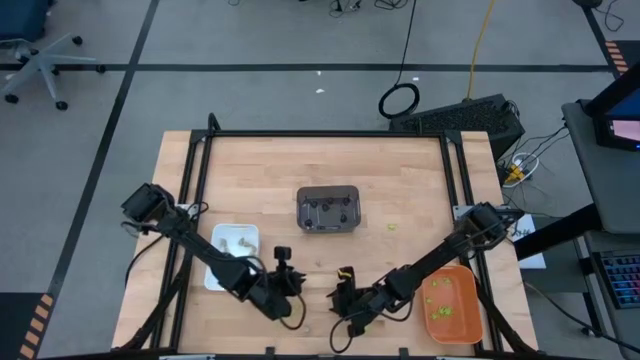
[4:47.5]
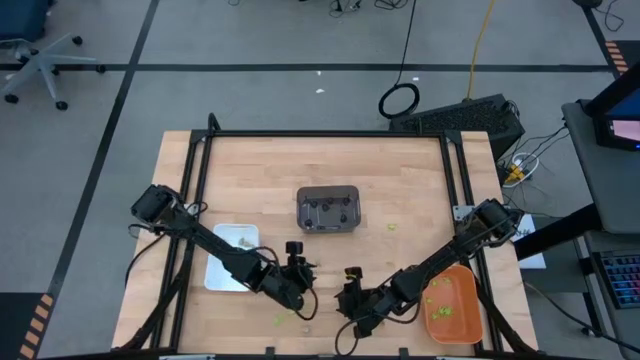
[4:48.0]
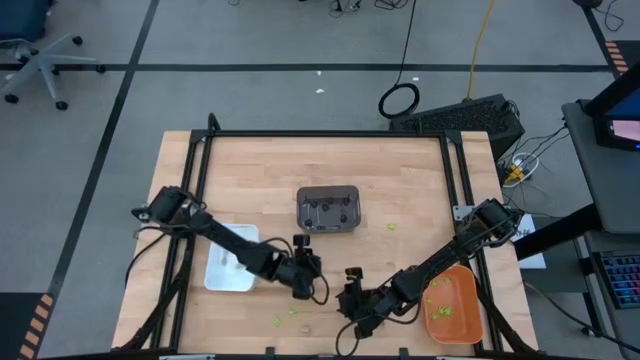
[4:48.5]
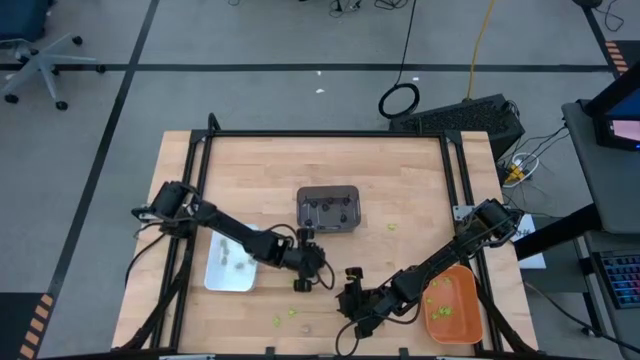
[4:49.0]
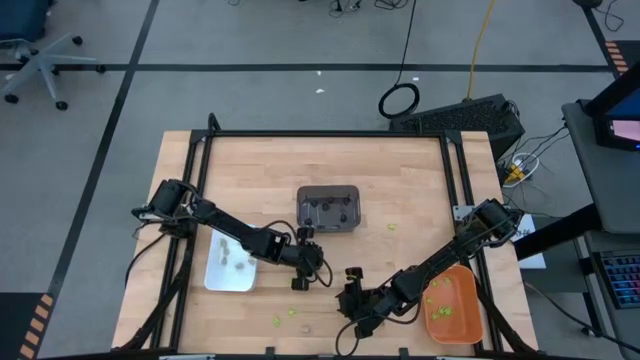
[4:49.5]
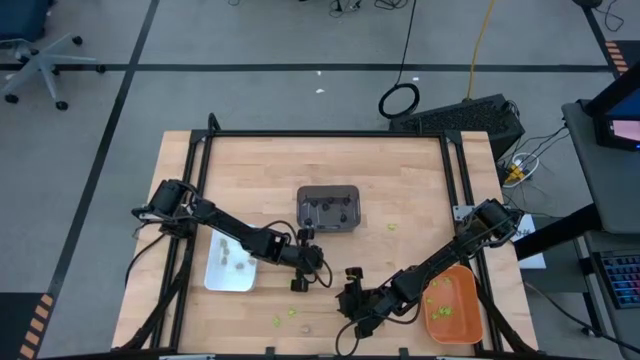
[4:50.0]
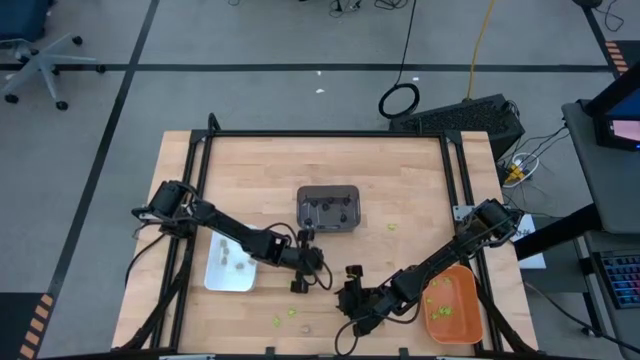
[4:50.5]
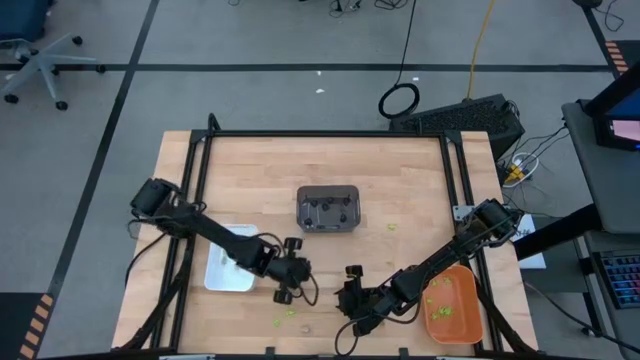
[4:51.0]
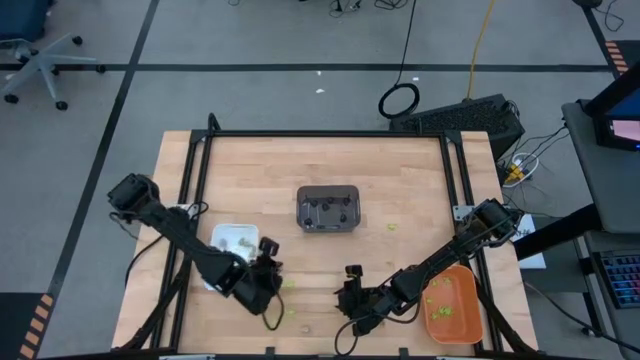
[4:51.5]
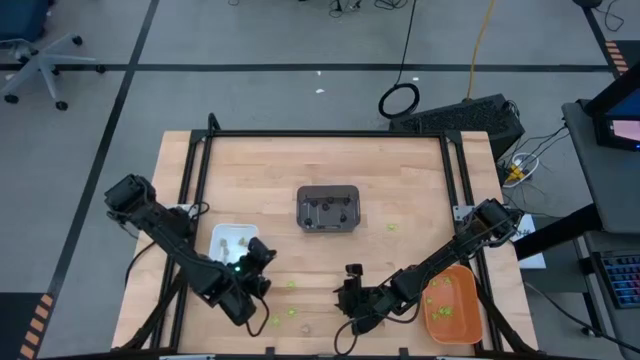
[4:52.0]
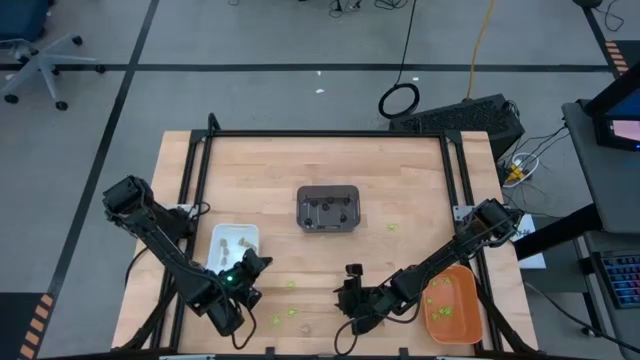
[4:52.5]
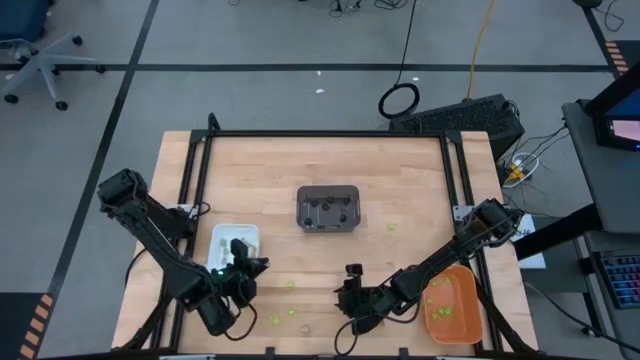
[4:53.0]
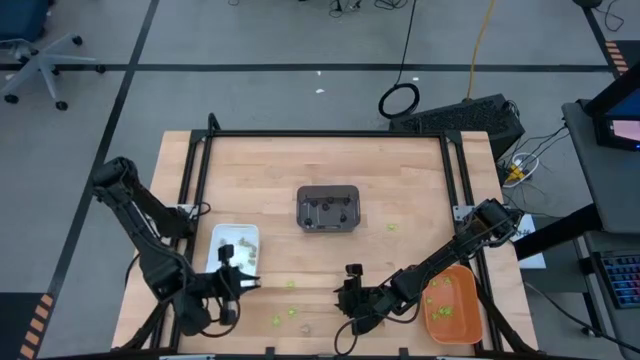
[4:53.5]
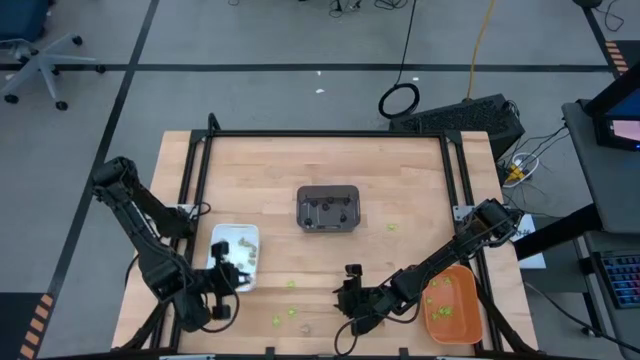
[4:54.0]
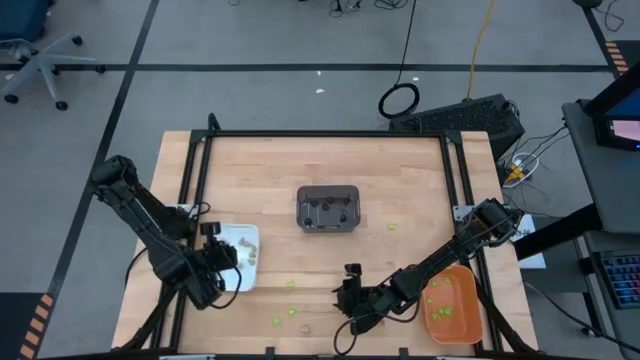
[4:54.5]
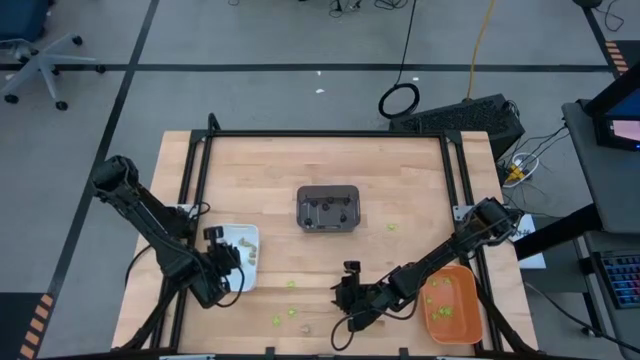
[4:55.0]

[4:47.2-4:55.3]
Task: Sort Halloween decoration
Put the white skull toy into the white bin

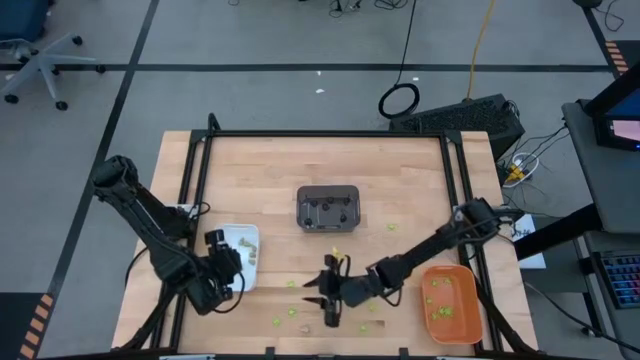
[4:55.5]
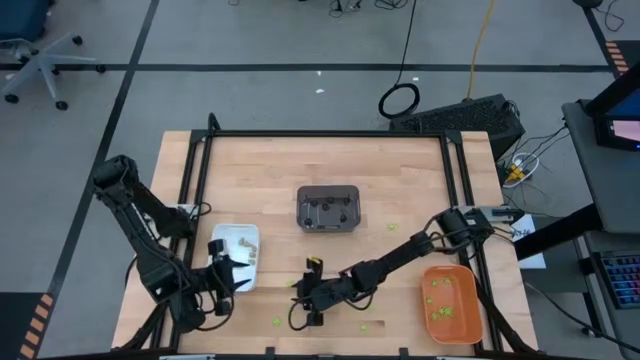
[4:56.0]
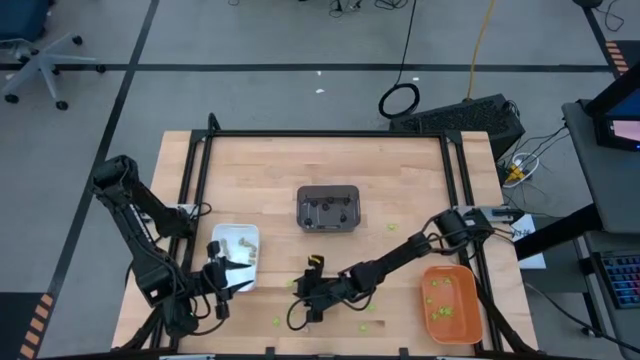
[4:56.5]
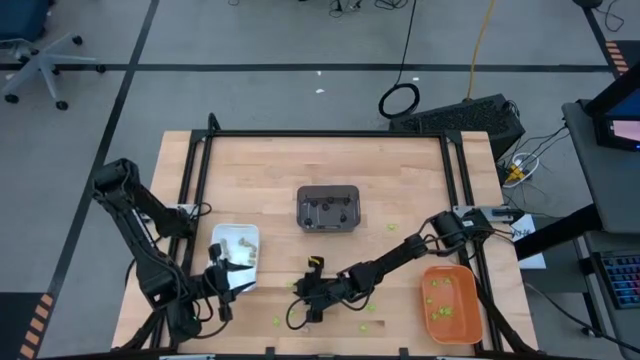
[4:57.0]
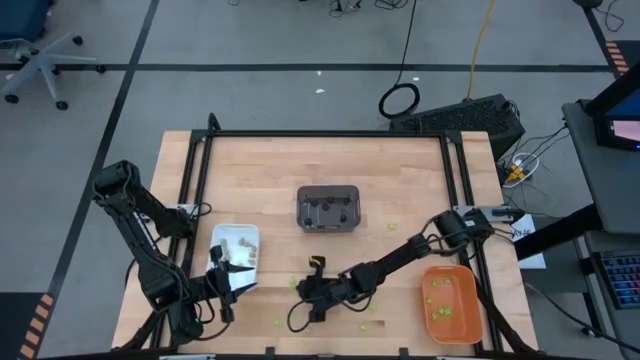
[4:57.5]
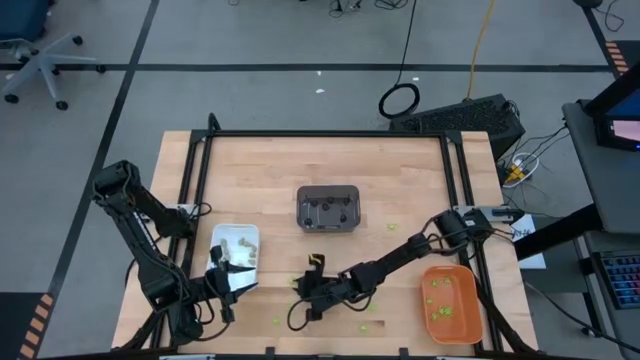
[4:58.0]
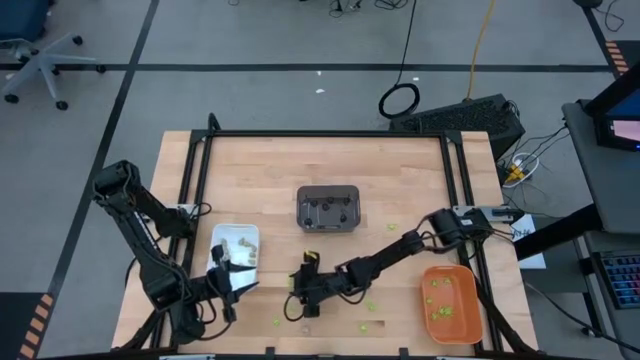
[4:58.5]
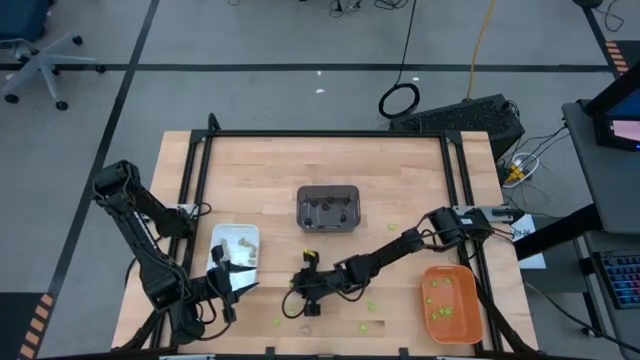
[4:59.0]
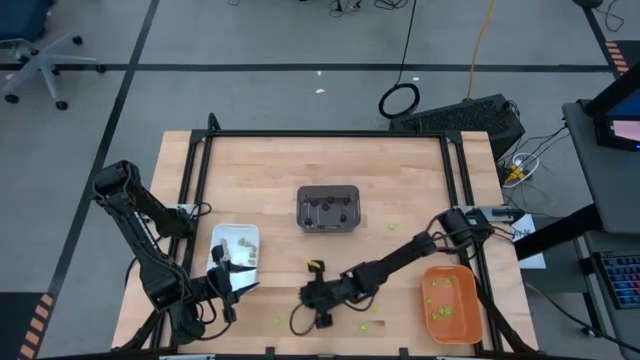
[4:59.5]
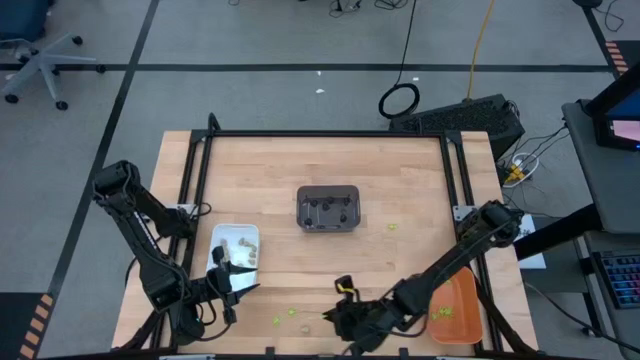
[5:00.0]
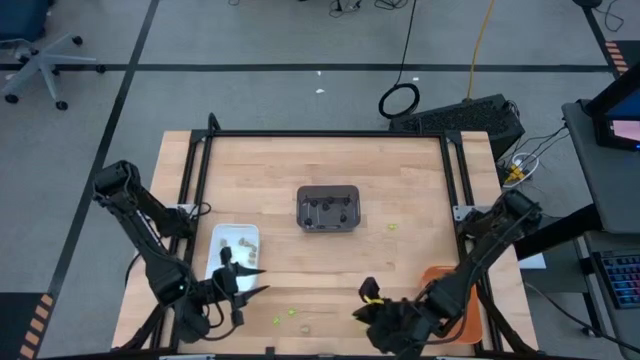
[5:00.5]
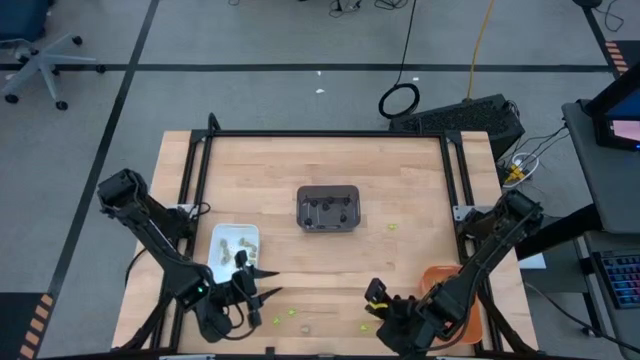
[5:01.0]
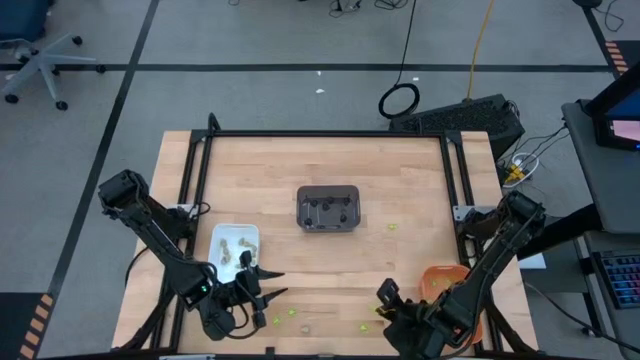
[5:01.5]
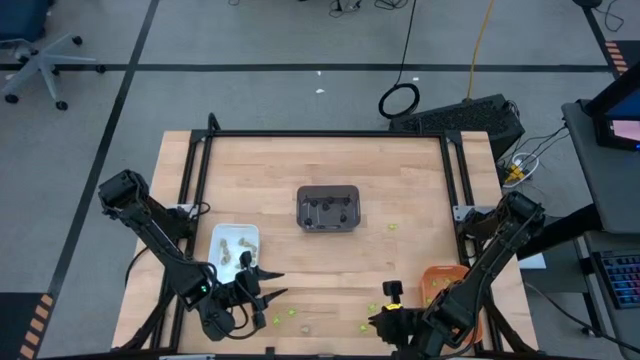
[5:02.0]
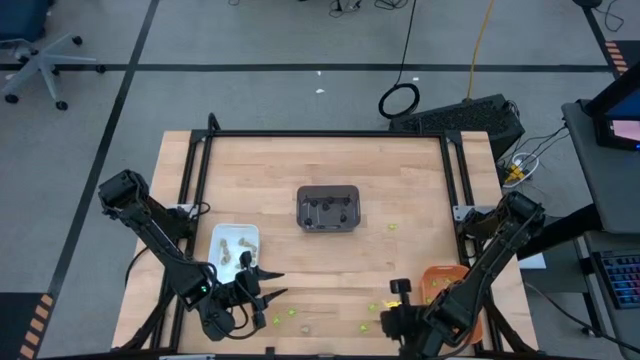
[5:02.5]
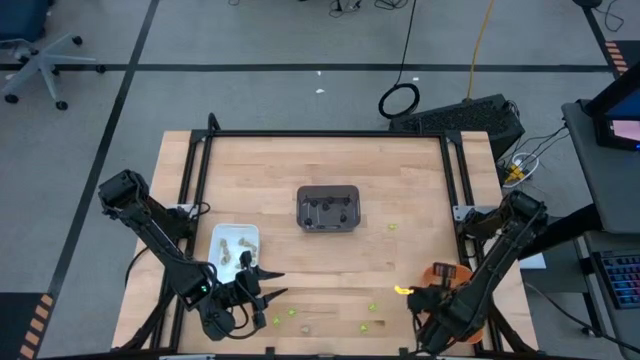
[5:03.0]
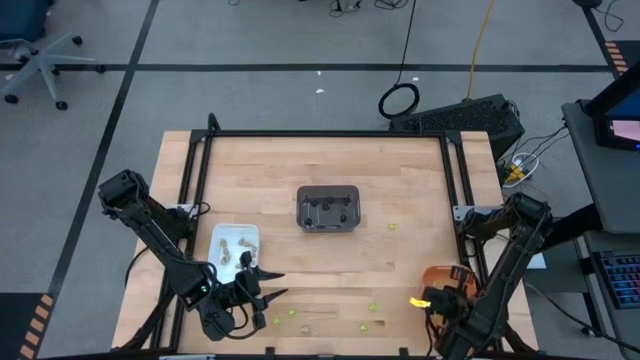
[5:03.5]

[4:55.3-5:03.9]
Put the green spider toy into the orange bin

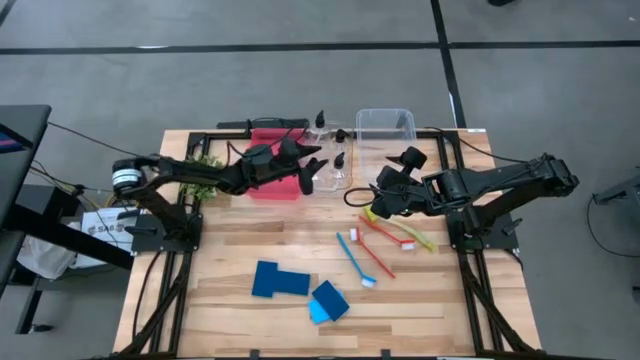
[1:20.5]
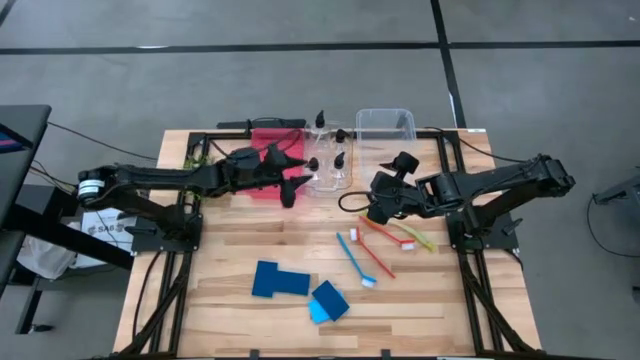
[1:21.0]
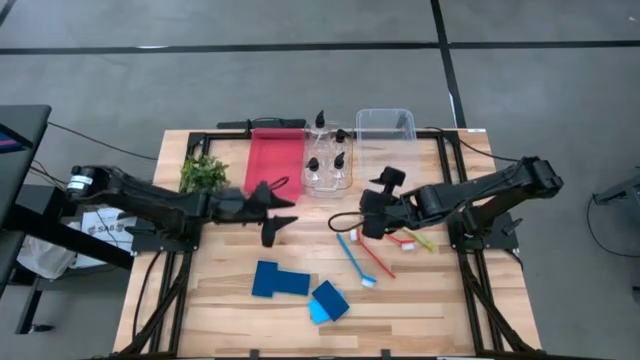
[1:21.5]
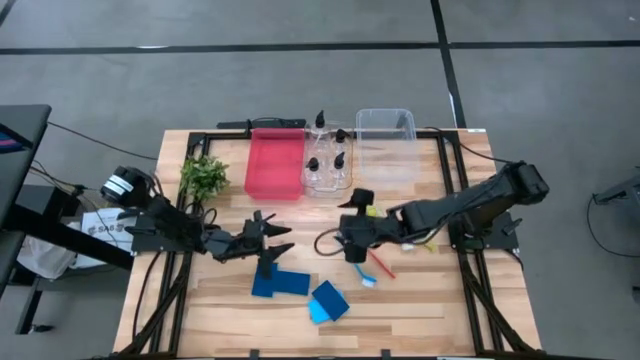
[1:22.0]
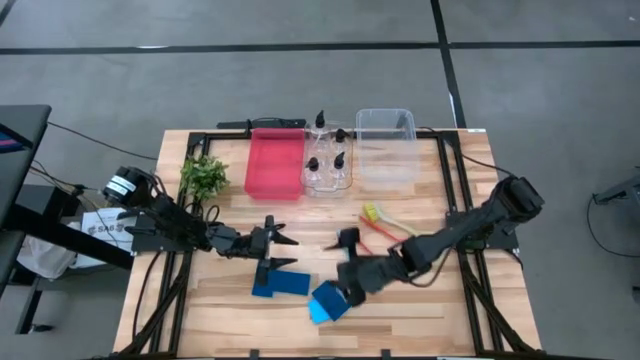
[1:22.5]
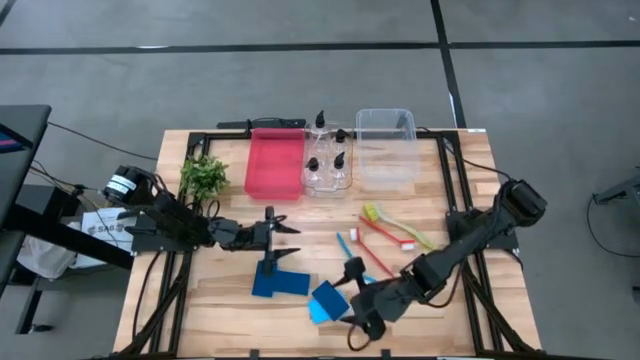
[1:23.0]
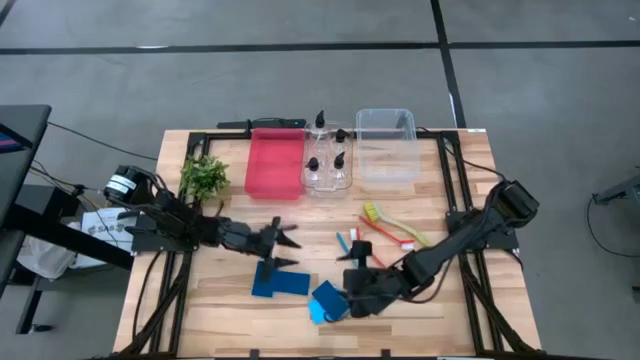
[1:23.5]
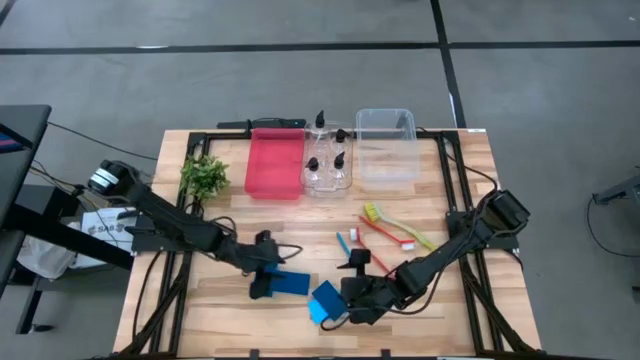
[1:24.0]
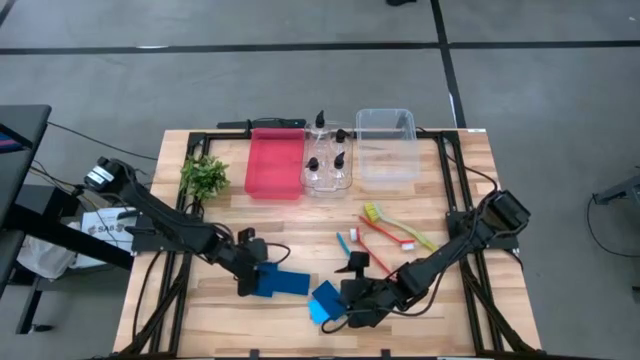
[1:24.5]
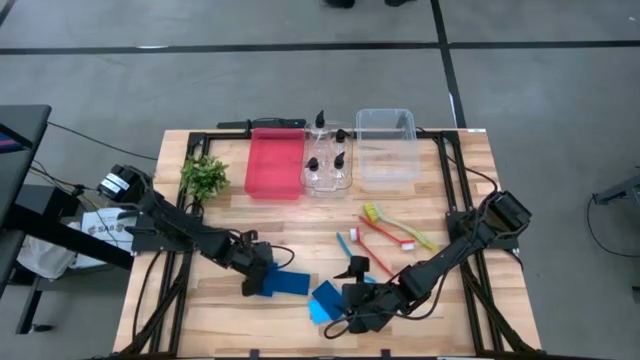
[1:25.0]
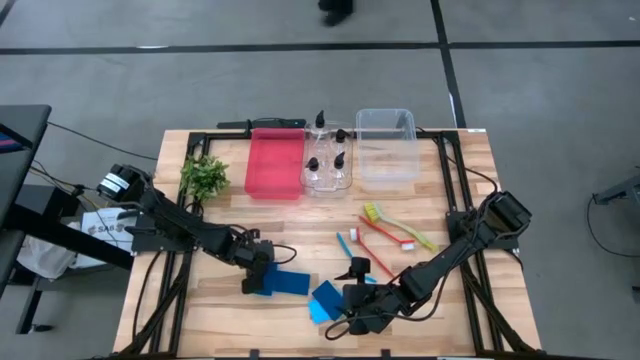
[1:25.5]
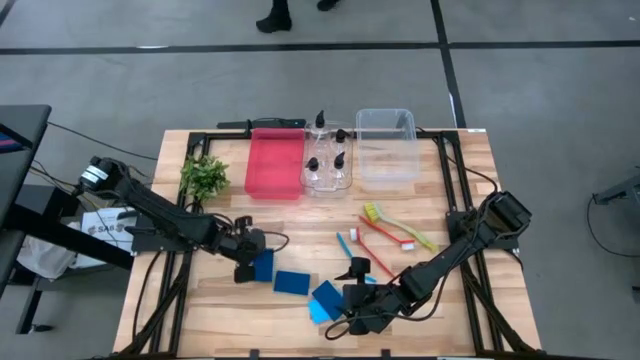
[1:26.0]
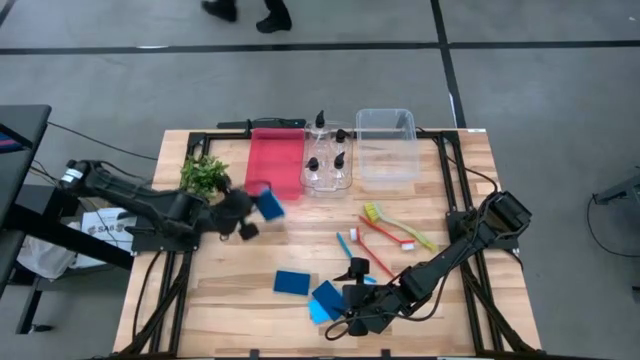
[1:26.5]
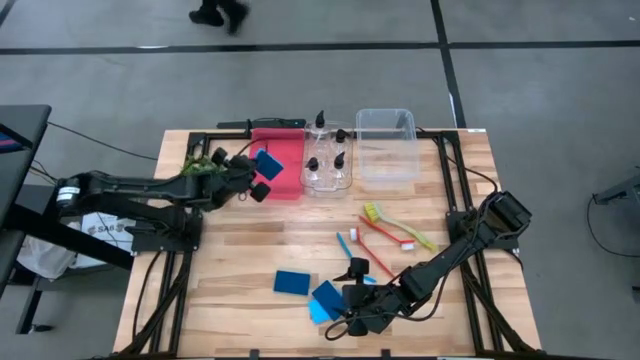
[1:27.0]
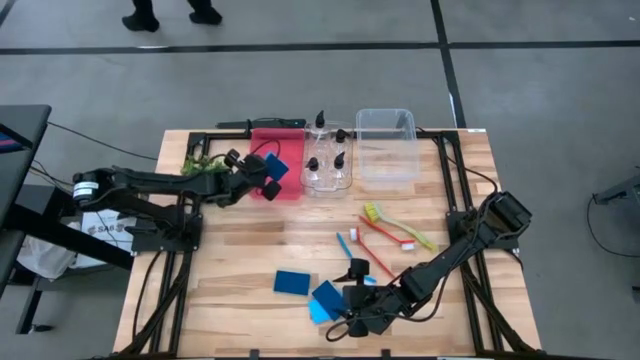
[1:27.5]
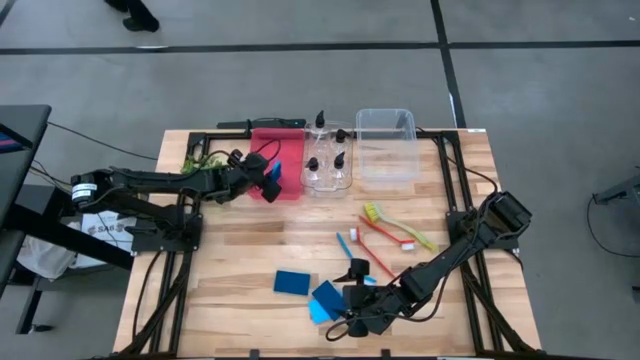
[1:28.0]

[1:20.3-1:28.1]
Task: Pick & Place Kitchen Sink Supplies
Put the blue sponge into the pink bin
